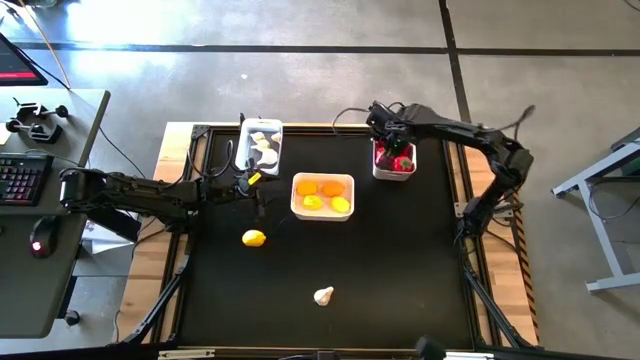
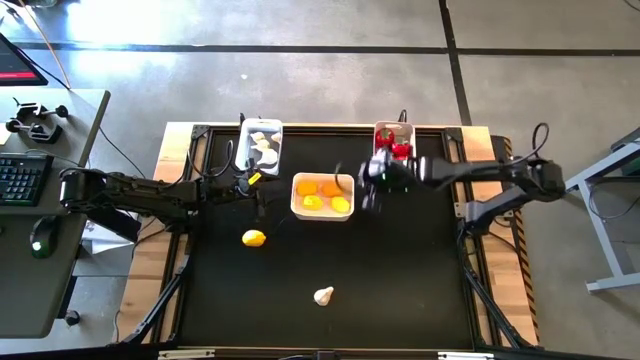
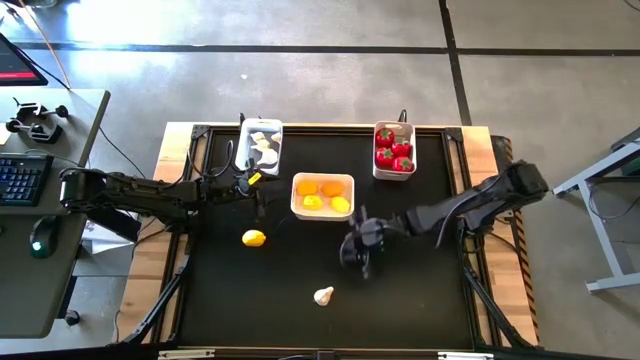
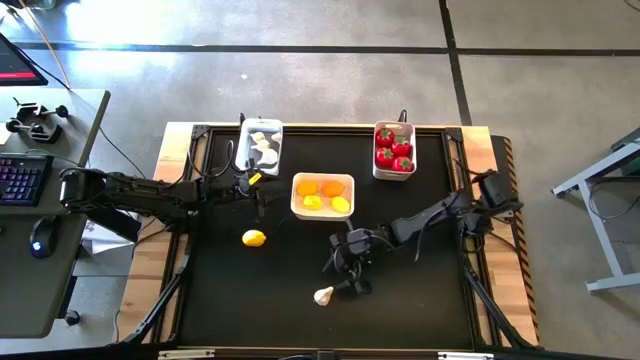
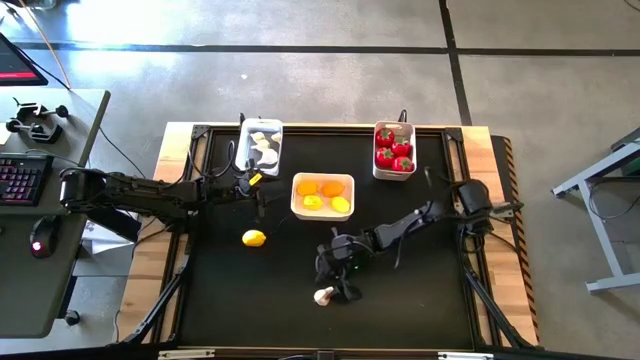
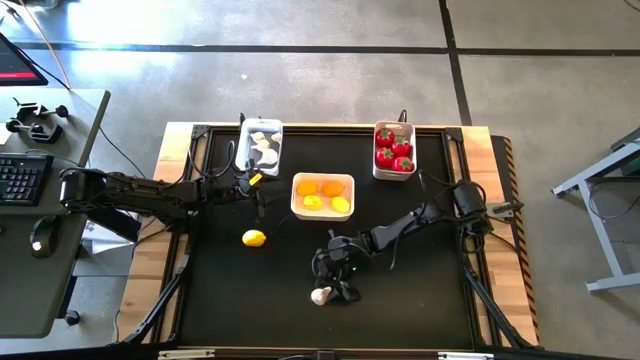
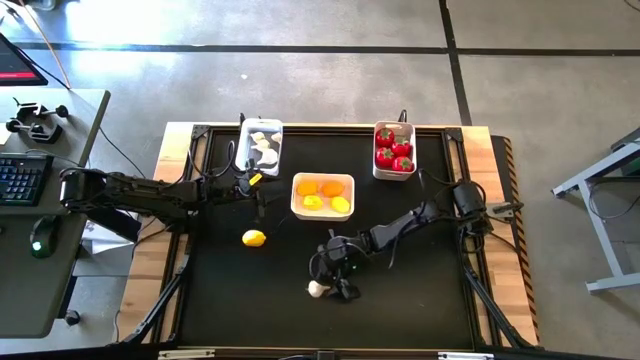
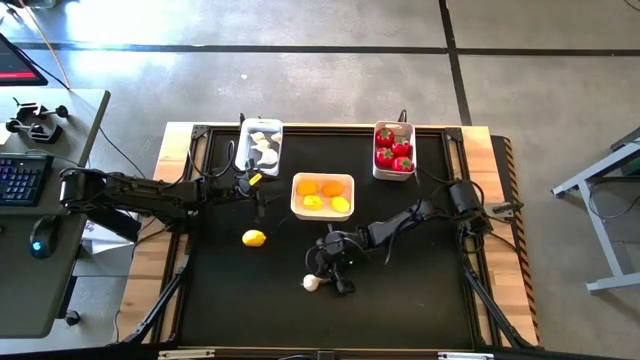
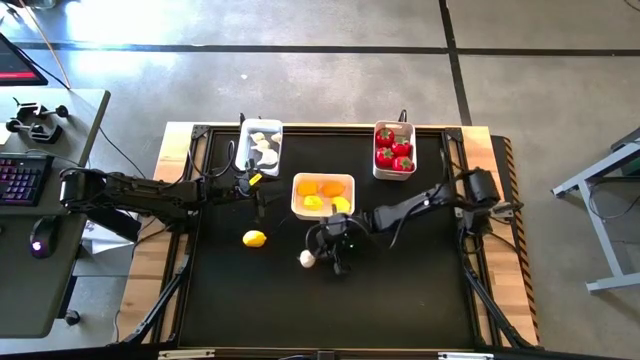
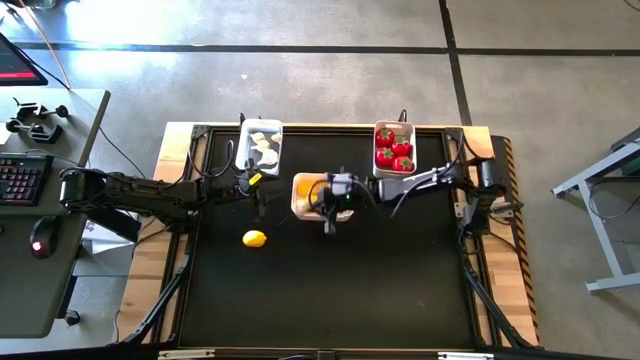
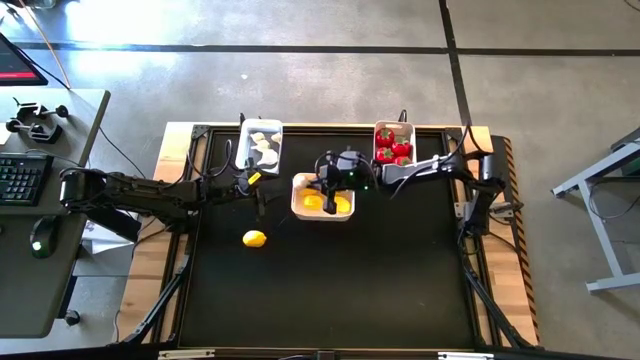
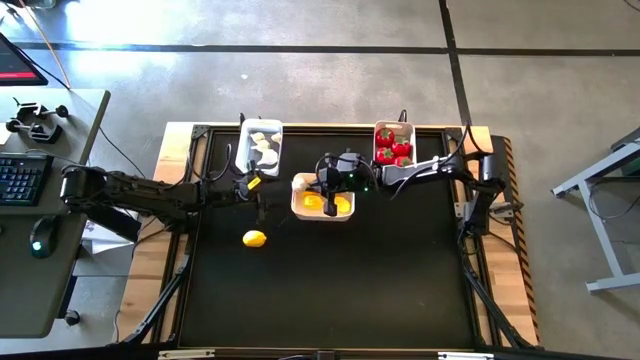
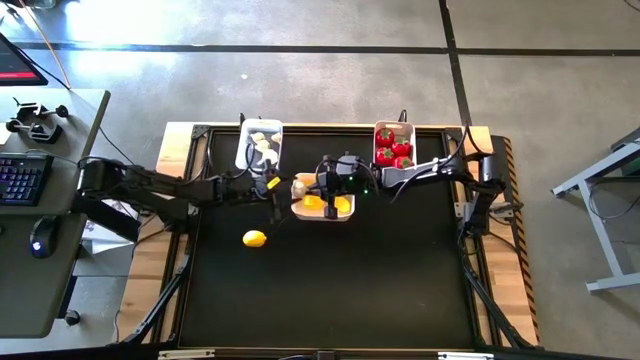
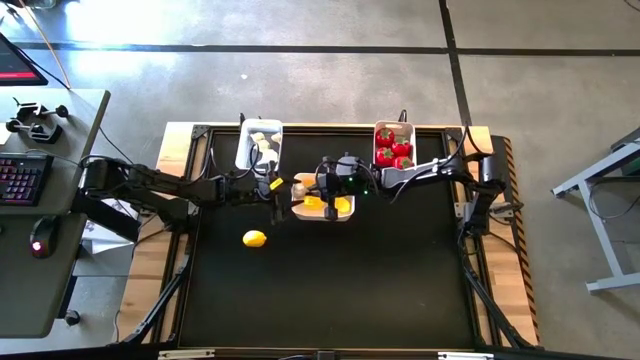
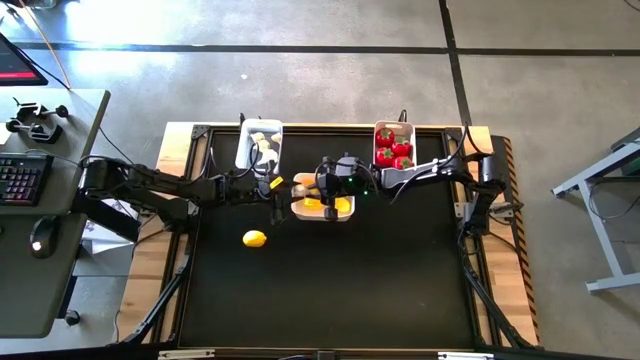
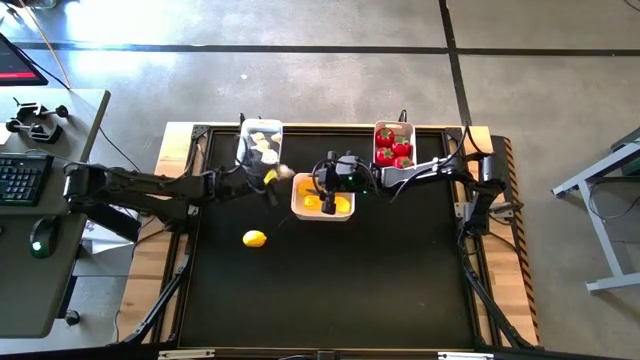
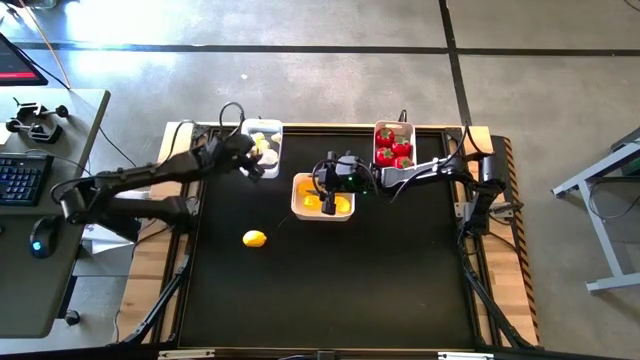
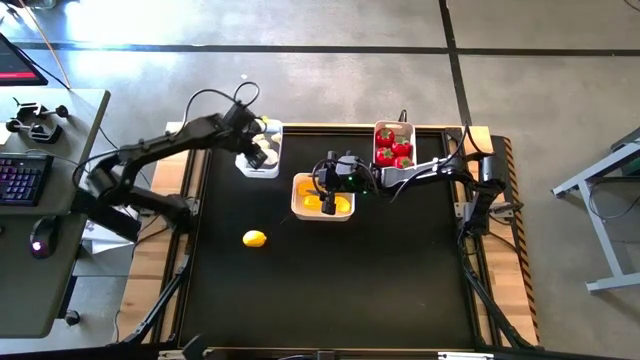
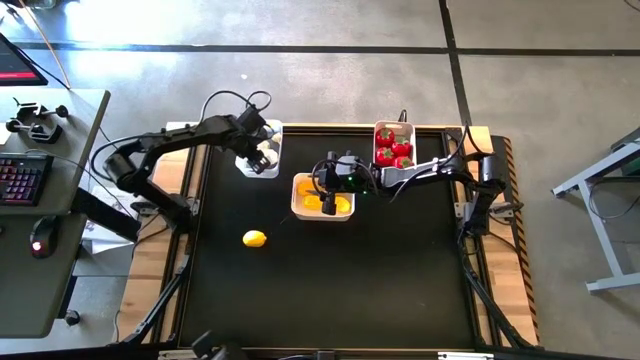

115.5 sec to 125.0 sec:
Task: Sort produce into baskets
Put the white garlic into the top transparent bin

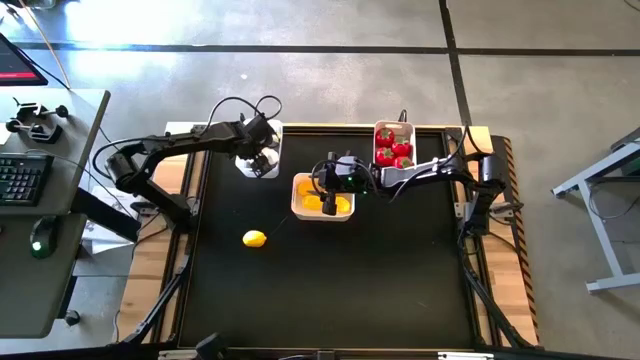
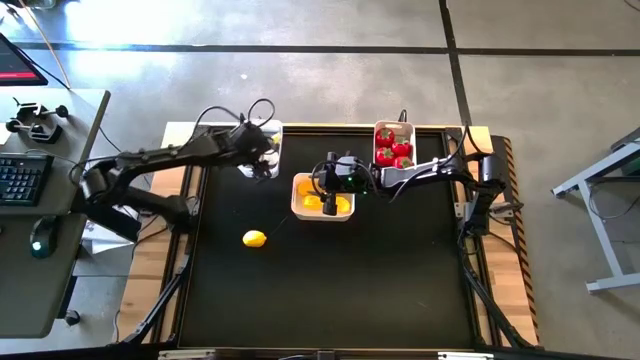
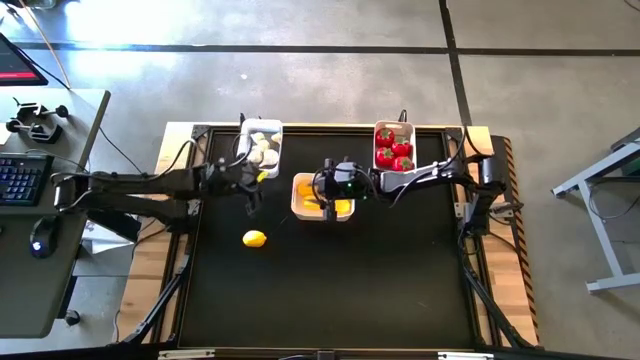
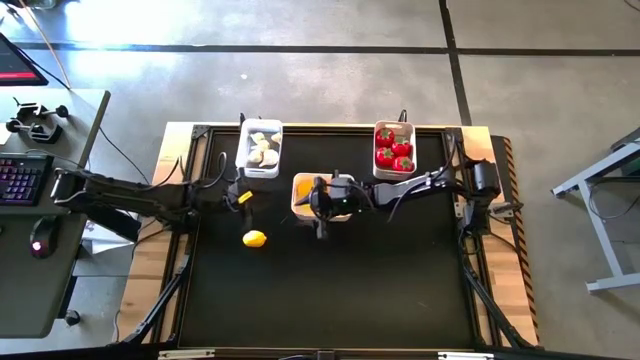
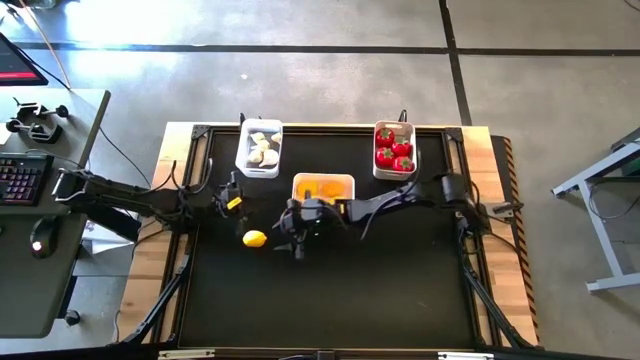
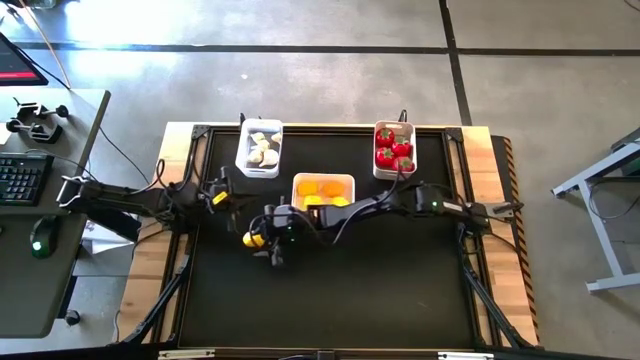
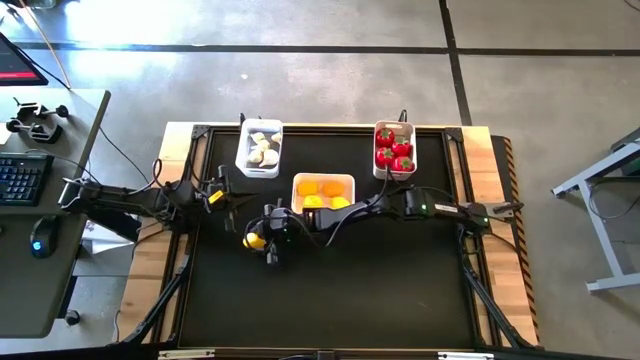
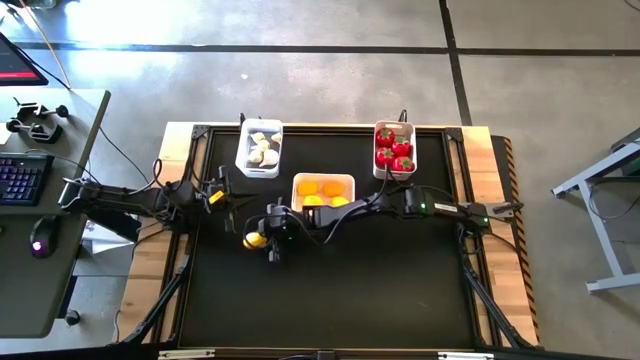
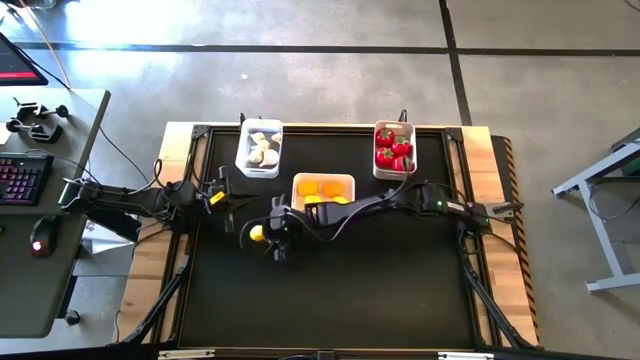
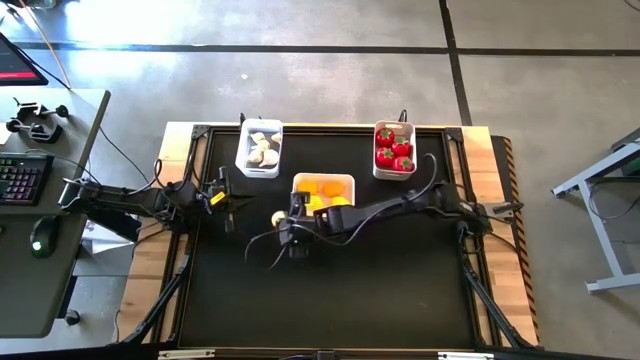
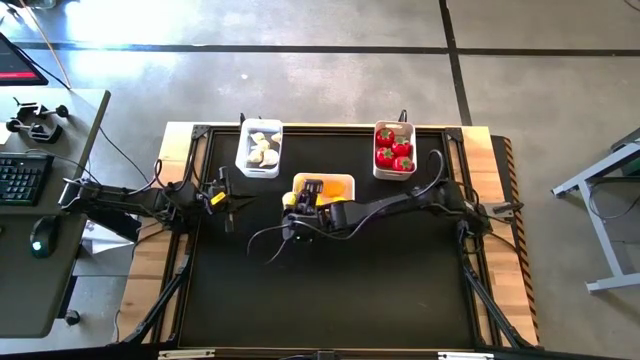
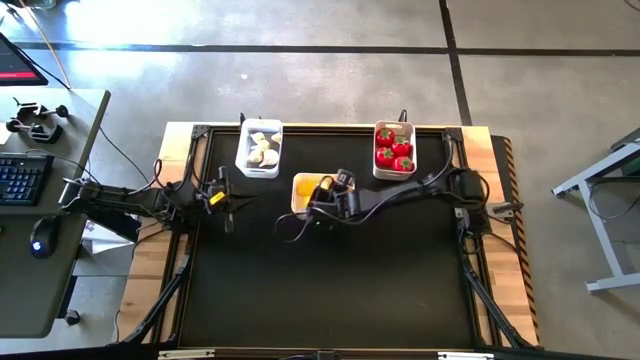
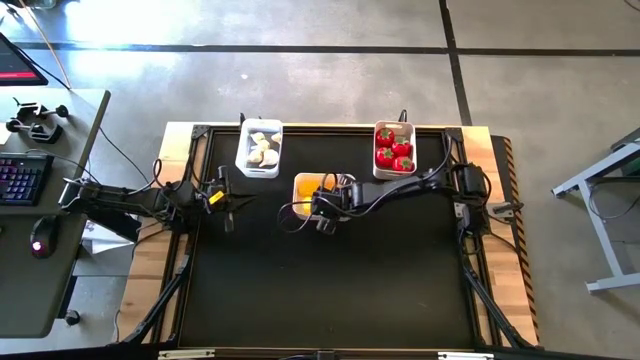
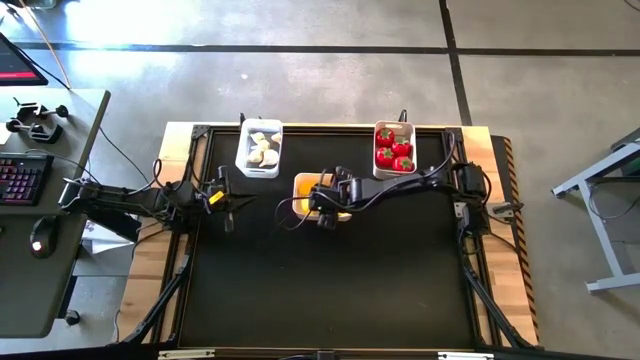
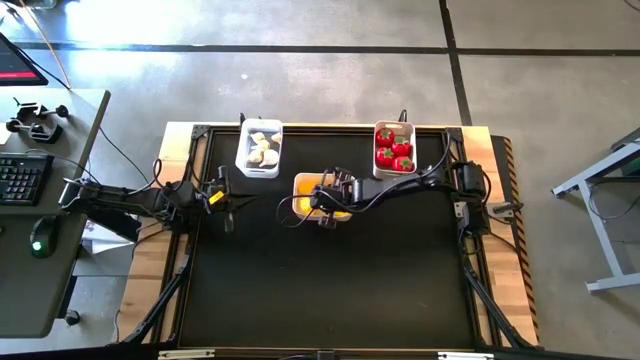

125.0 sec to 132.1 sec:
Put the yellow lemon into the white bin

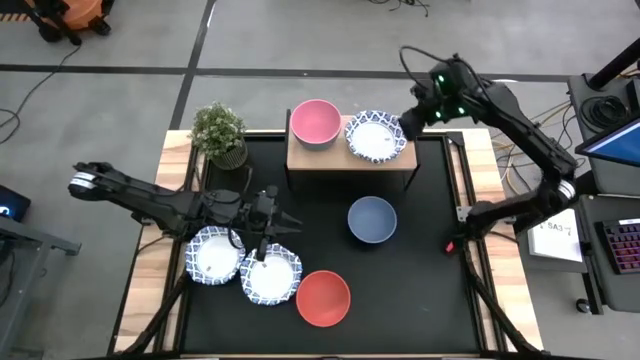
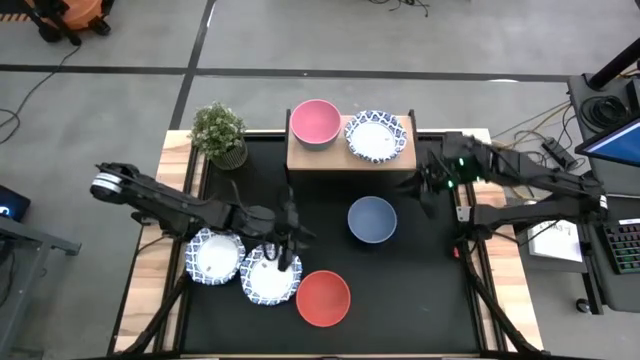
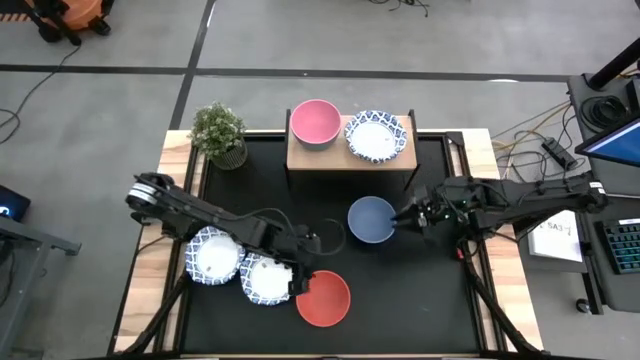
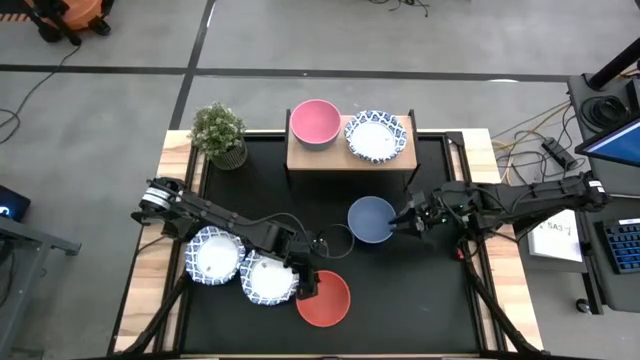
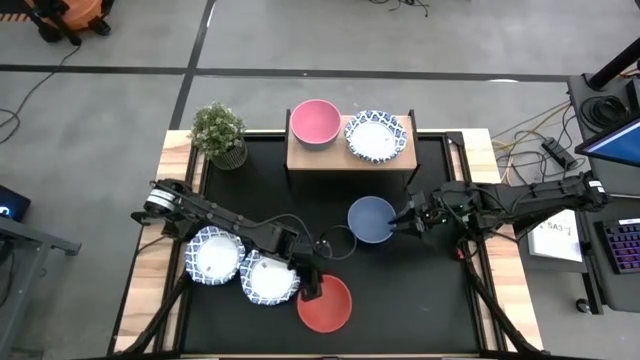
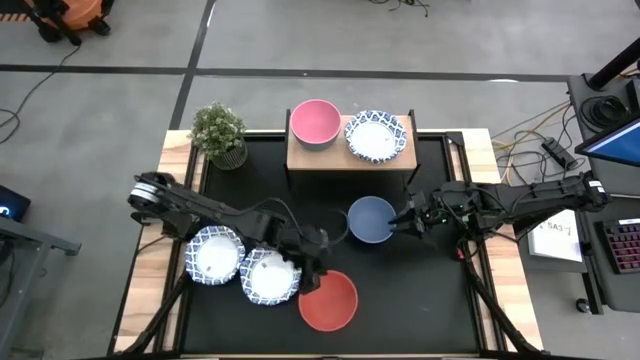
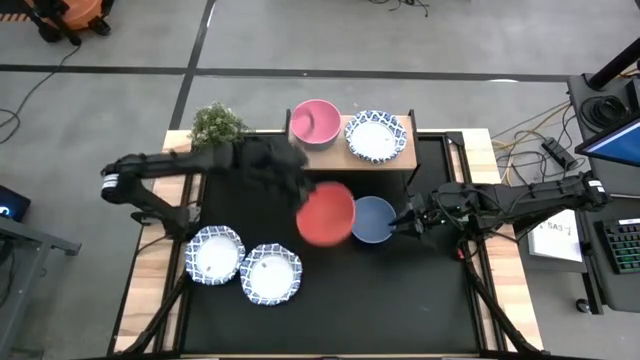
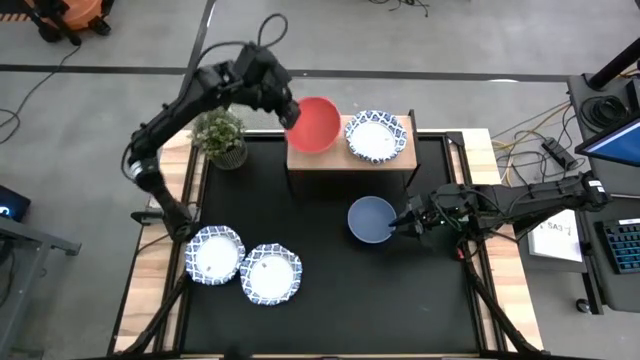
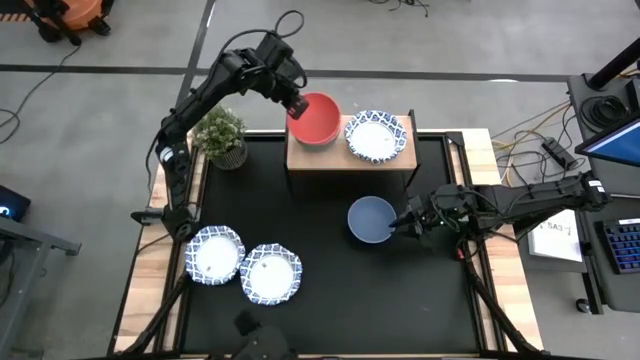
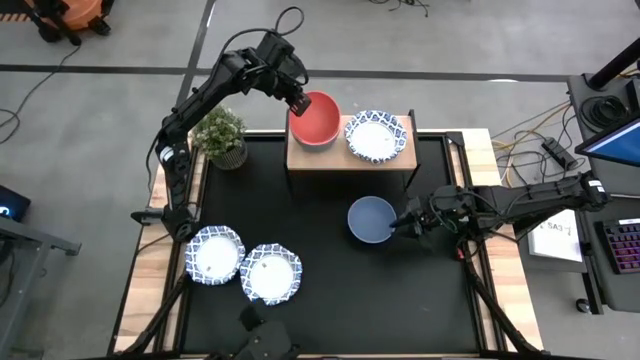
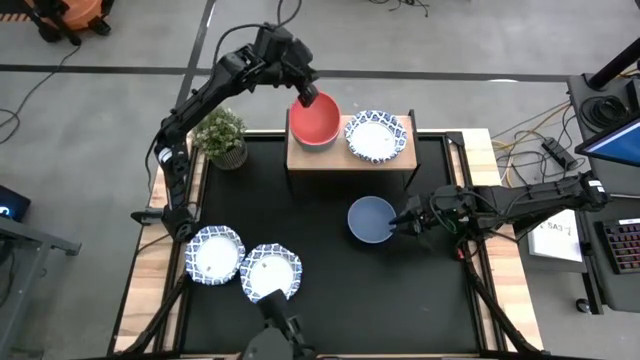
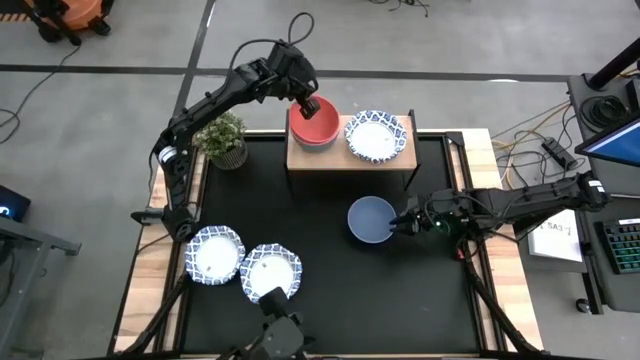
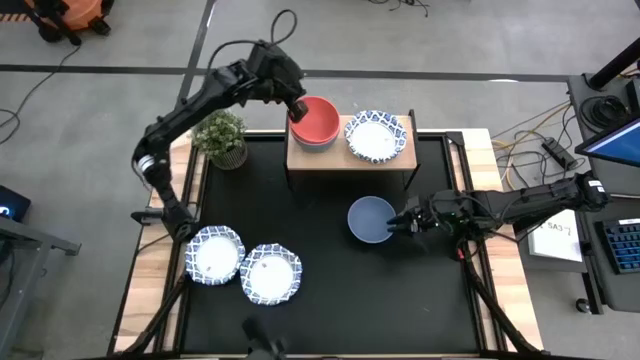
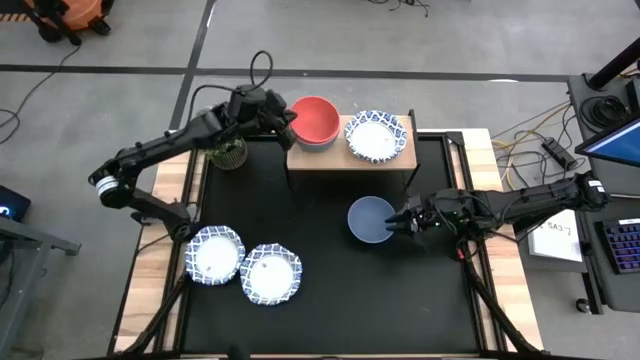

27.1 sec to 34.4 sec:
Task: Place and stack bowls onto a shelf
Stack the orange plastic bowl on the pink plastic bowl on the shelf
